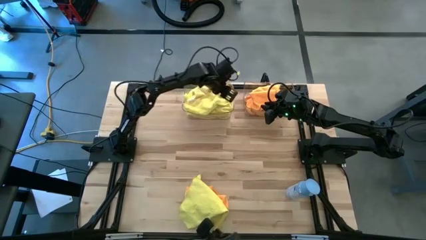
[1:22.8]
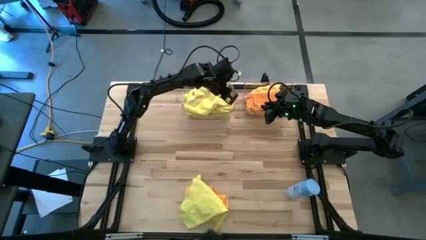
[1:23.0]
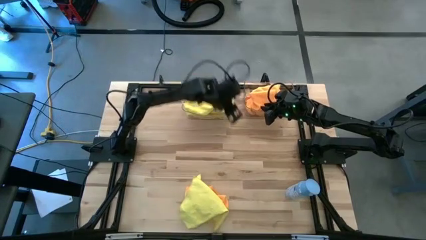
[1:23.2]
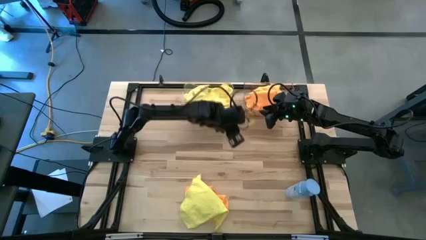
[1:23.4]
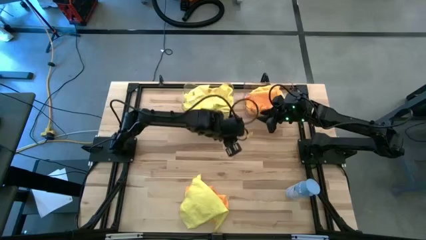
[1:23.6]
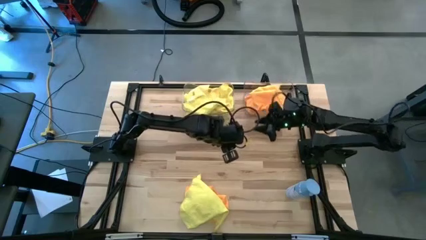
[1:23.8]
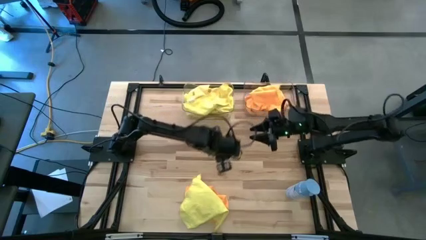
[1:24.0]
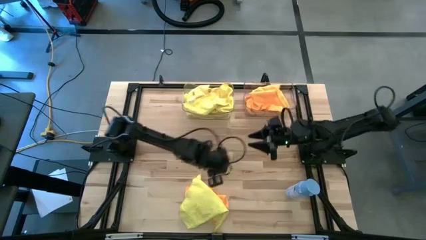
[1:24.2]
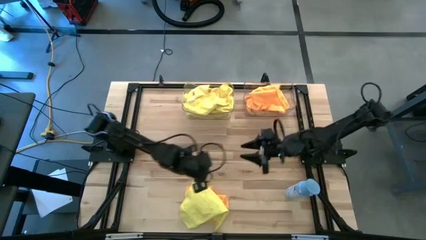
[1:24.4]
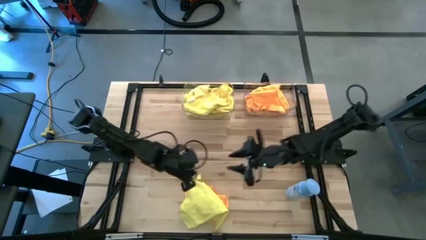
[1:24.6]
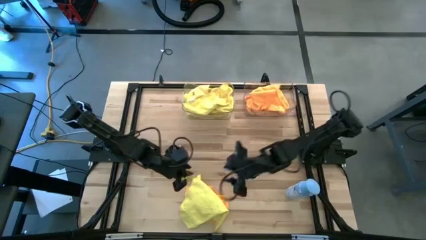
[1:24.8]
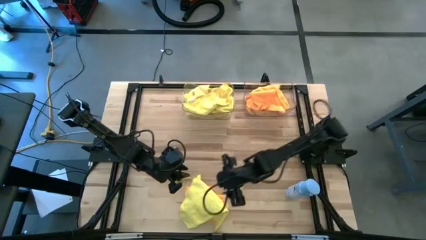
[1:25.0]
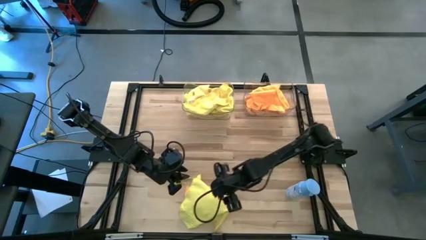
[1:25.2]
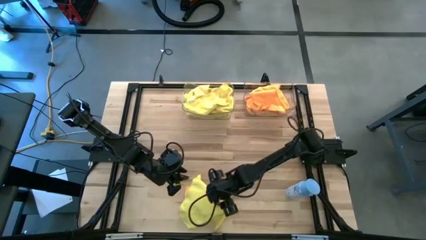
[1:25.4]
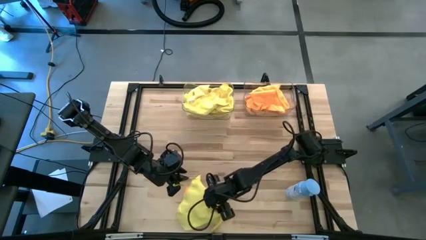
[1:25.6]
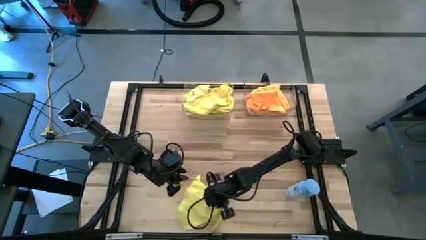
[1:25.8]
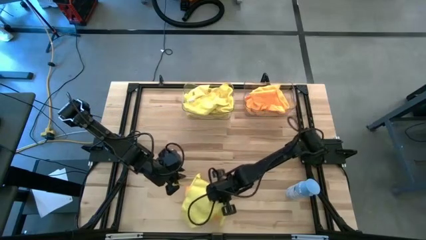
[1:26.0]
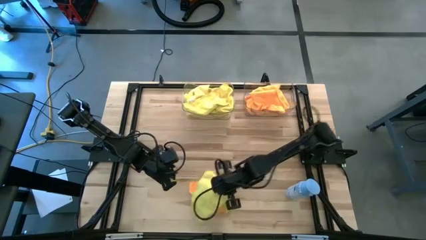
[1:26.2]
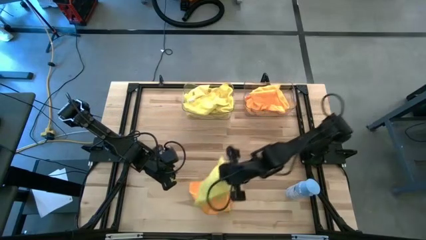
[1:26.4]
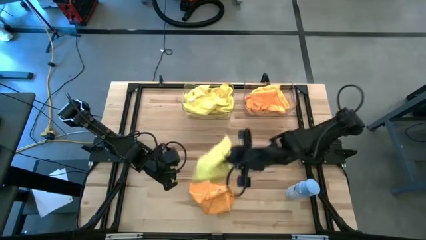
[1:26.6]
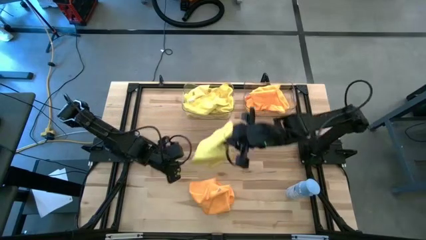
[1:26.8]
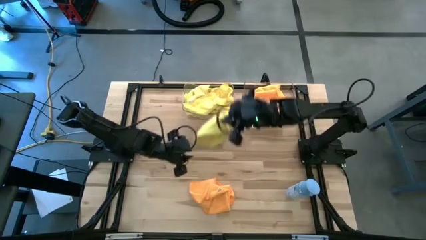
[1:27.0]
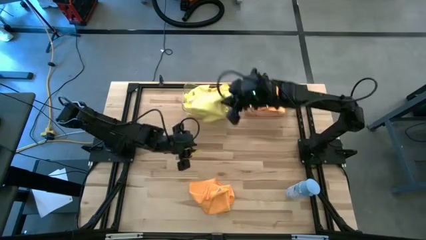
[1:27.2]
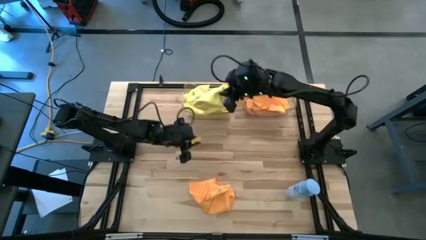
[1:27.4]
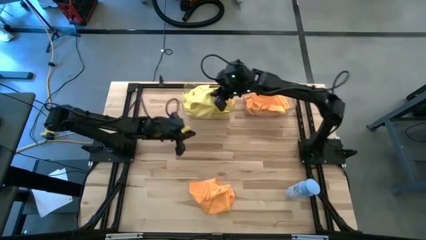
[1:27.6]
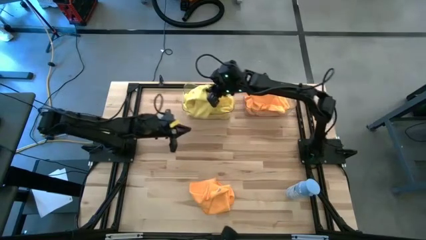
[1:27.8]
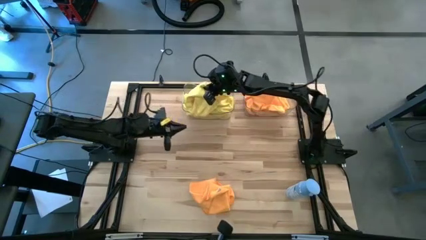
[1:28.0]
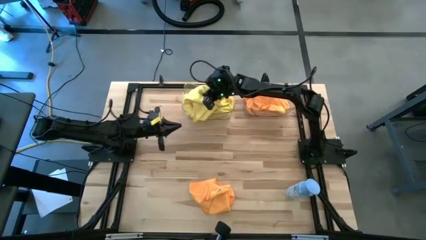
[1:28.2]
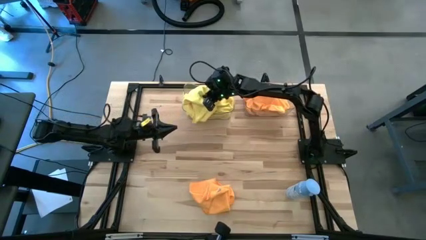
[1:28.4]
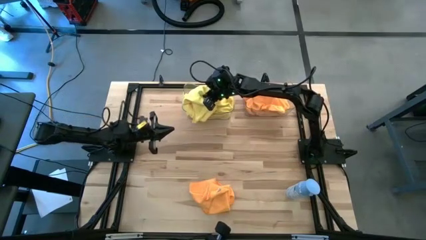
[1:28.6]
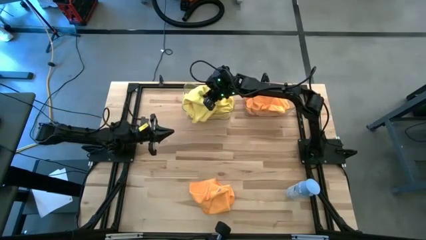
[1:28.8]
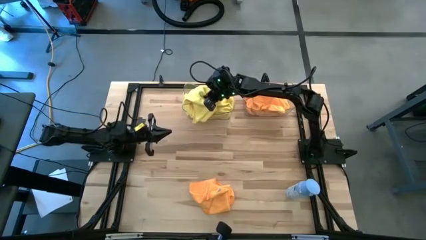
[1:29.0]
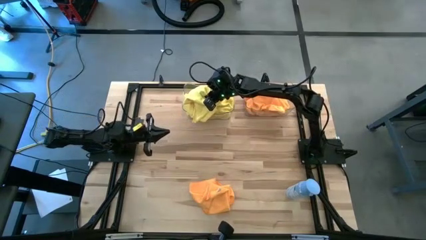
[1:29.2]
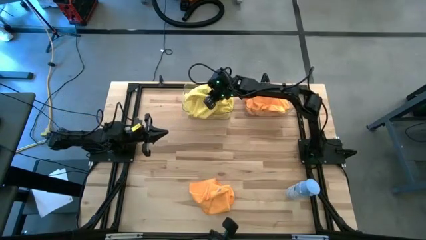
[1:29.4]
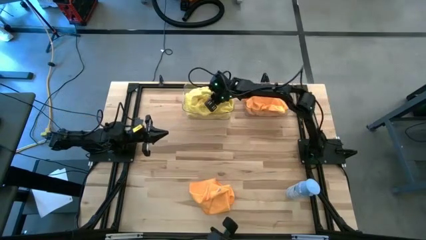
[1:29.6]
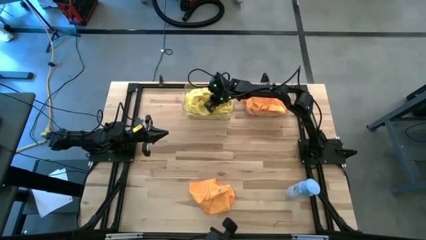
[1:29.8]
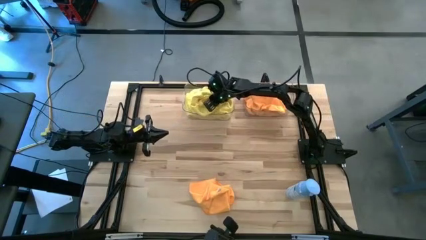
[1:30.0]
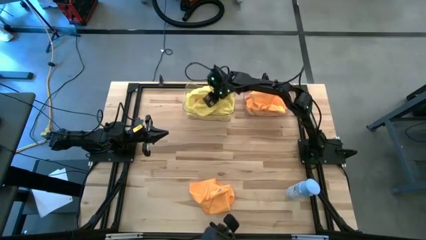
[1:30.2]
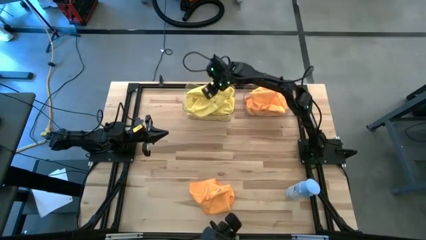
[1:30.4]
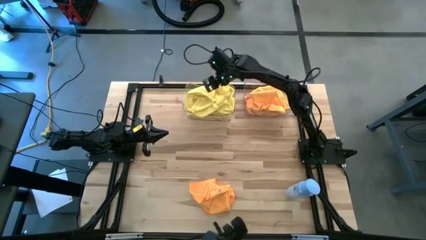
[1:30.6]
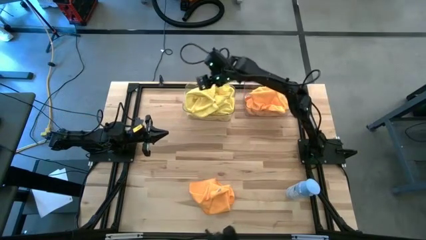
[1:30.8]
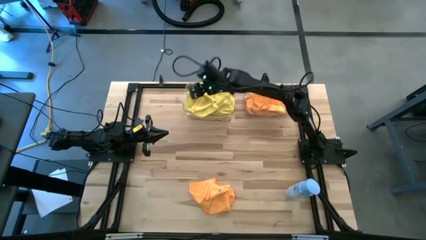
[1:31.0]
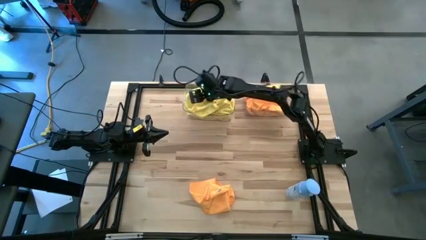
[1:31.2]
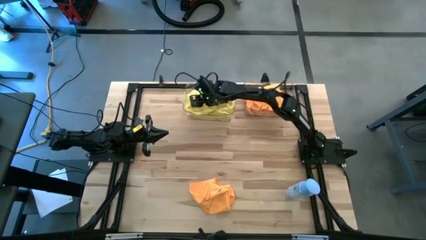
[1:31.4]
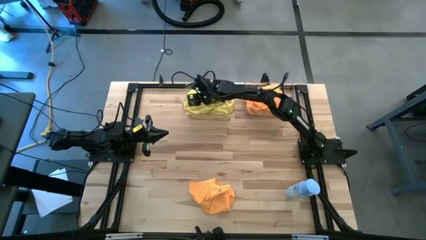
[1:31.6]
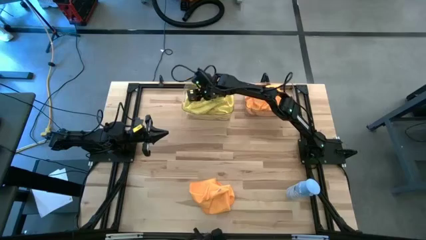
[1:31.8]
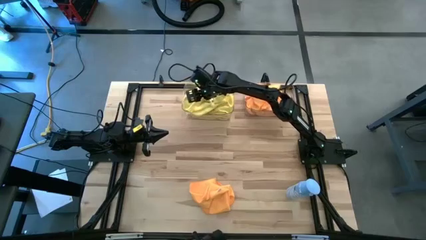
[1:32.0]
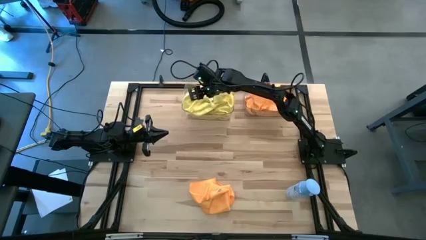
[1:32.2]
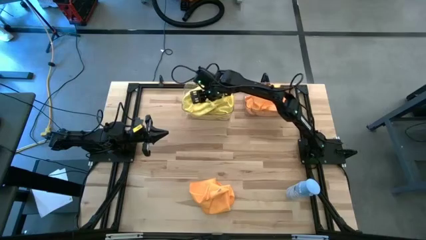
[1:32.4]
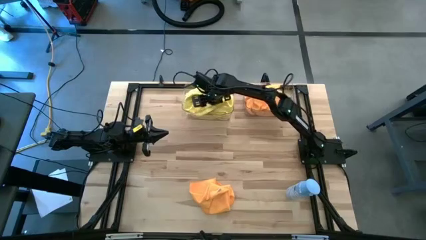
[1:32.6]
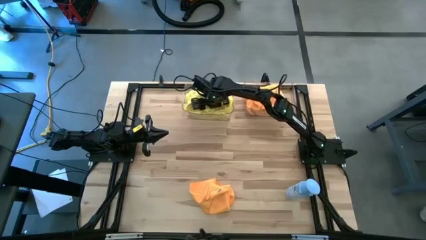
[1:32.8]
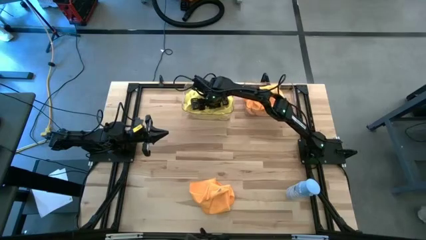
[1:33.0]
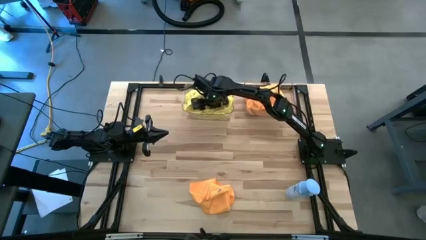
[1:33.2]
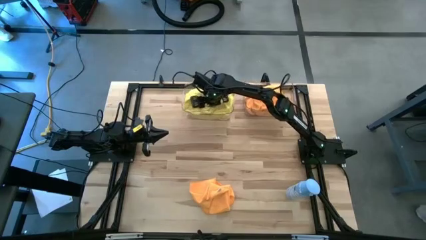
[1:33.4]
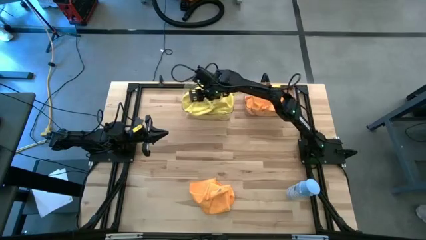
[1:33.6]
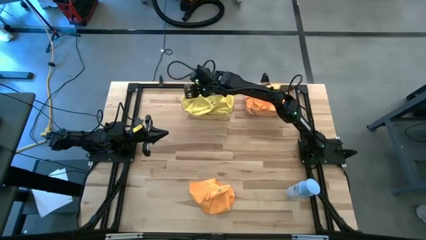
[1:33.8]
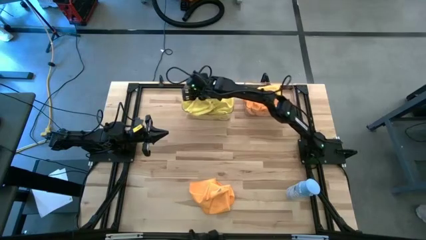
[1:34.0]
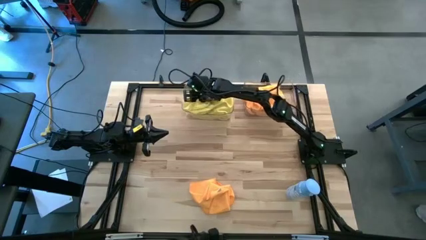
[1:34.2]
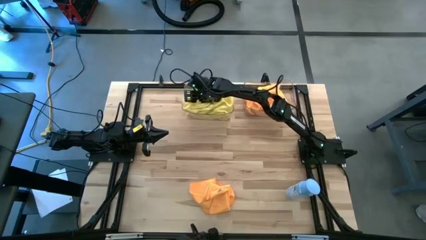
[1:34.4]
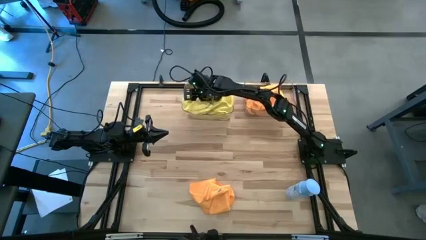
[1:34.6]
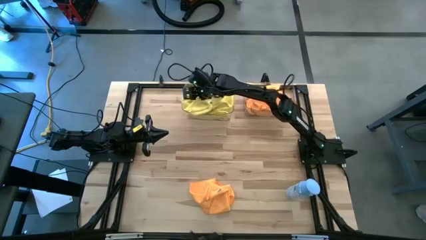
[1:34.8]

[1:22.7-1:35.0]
Task: Sort microfiber towel by color & place in baskets
Put the yellow microfiber cloth into the left transparent bin

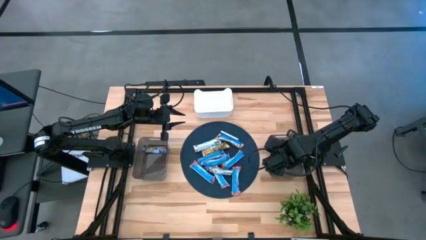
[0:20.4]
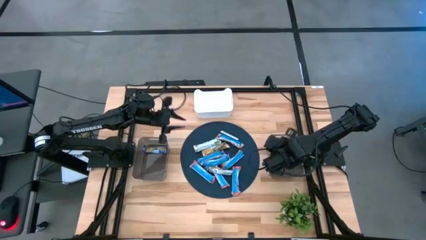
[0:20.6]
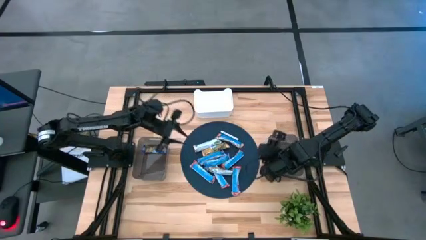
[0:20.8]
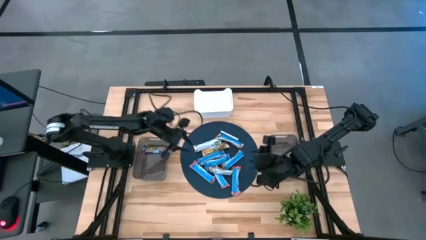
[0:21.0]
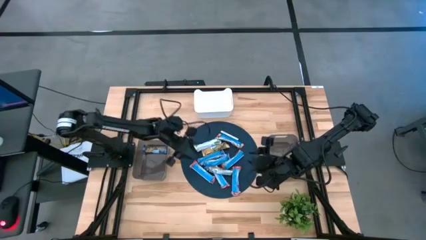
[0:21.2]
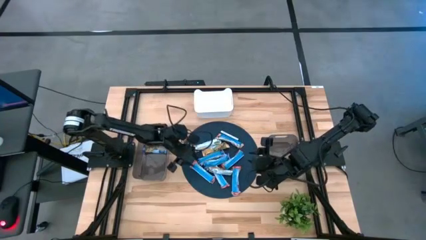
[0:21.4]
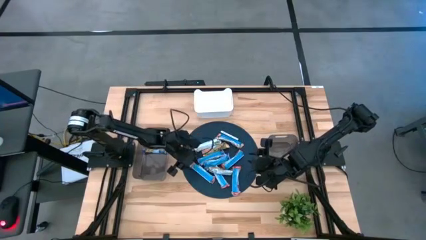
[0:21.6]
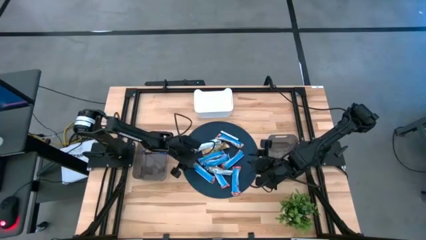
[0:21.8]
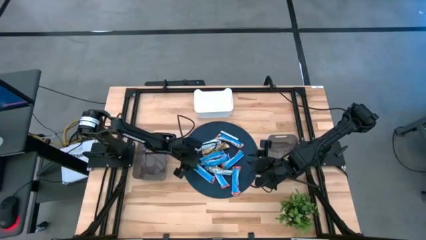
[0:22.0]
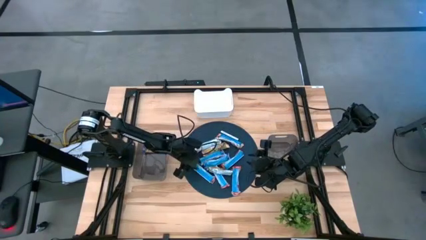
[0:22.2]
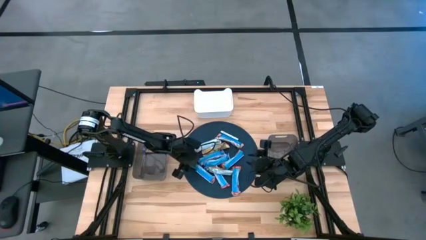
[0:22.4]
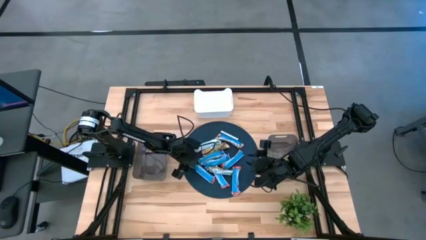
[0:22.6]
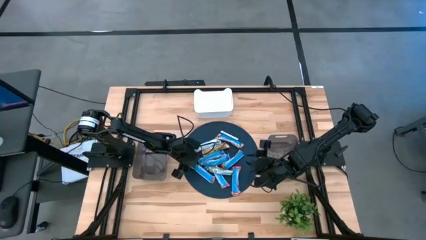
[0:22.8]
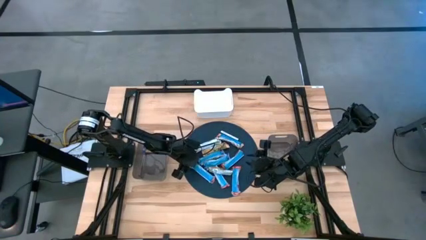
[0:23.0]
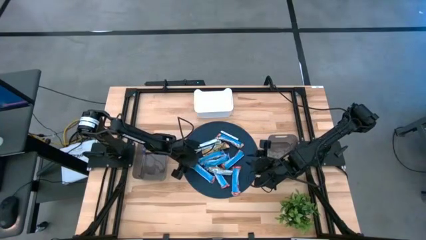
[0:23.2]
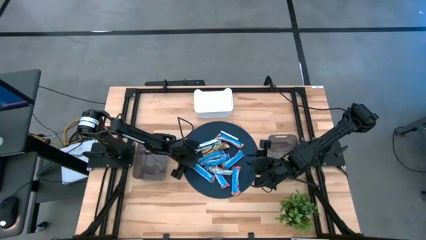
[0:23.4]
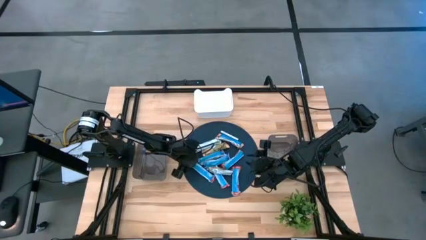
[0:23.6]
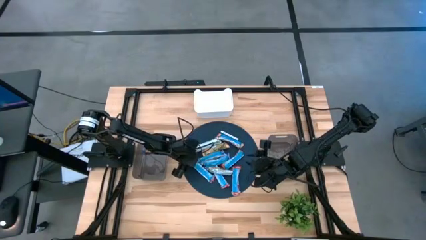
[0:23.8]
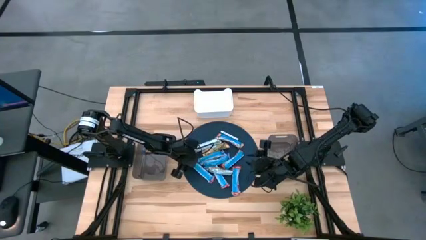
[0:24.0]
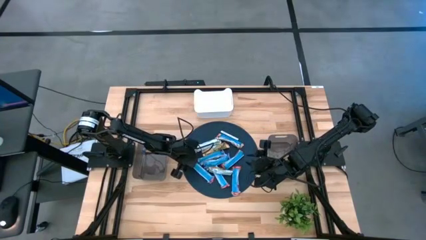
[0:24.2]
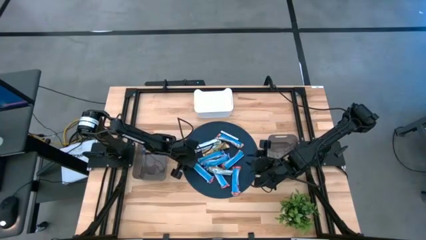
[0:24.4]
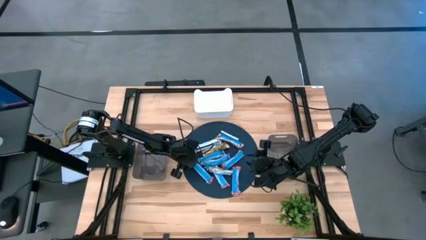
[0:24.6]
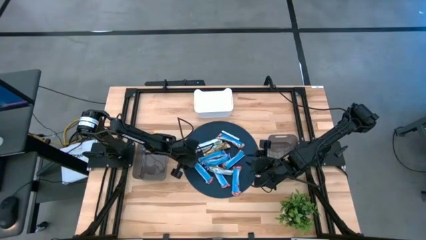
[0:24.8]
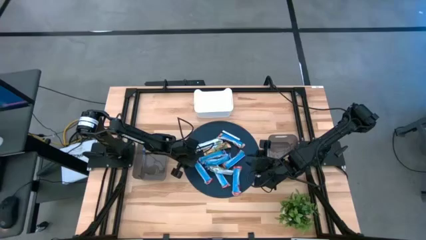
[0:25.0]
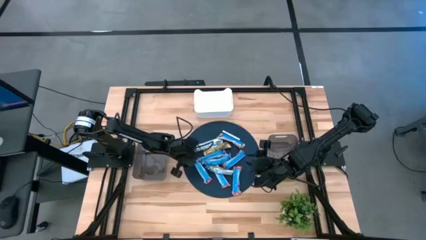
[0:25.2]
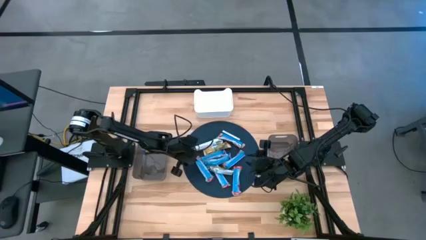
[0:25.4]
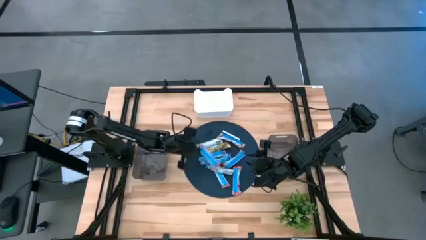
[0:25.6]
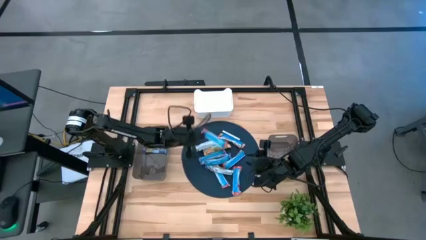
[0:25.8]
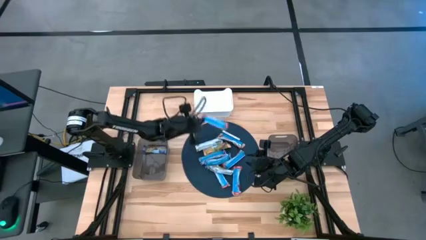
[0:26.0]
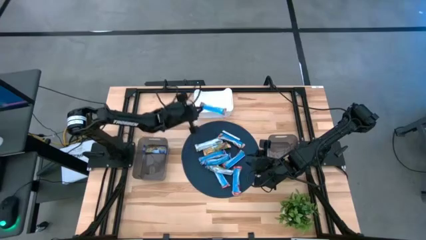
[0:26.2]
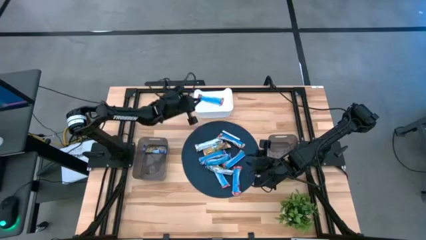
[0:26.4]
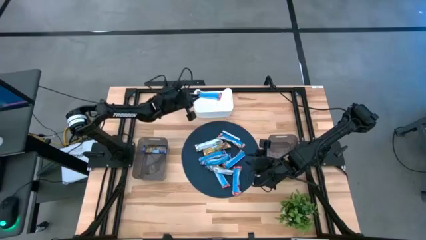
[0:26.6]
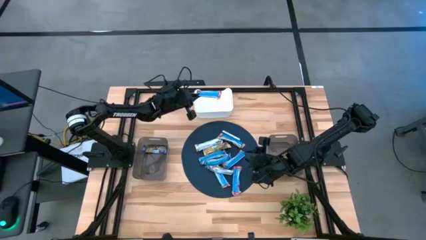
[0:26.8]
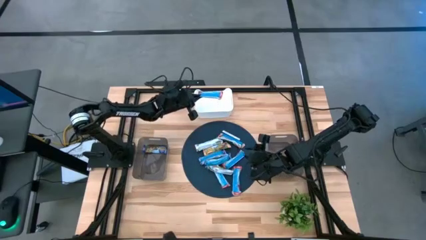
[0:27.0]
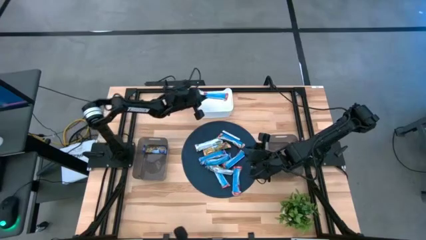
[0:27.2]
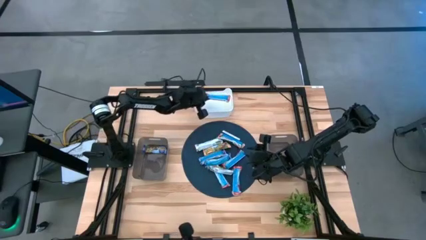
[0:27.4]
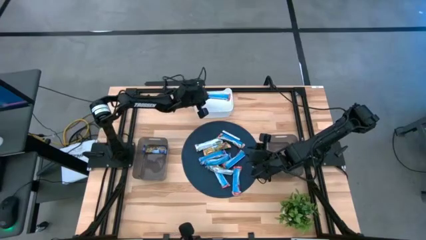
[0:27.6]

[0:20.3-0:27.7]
Task: Pick and place Granola Bars by type
Put the red granola bar into the white bin
